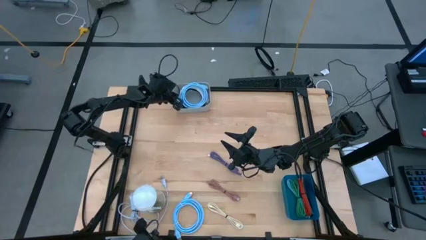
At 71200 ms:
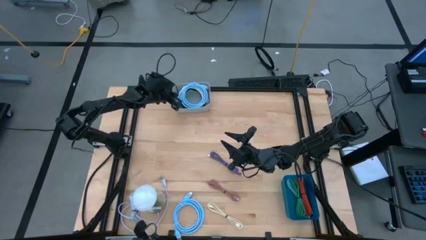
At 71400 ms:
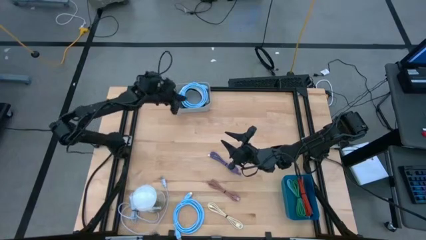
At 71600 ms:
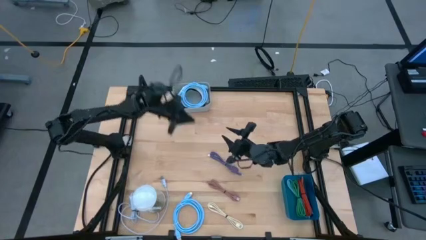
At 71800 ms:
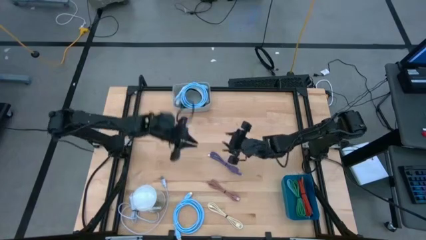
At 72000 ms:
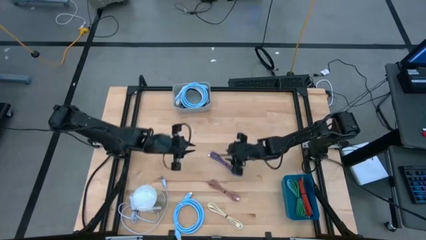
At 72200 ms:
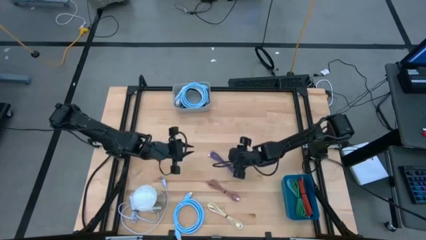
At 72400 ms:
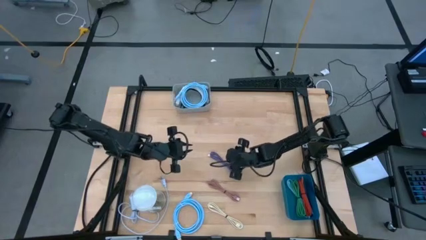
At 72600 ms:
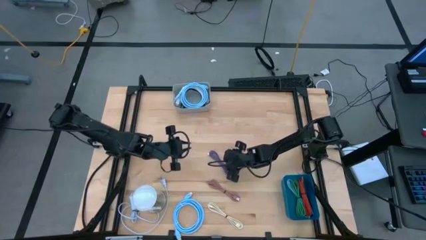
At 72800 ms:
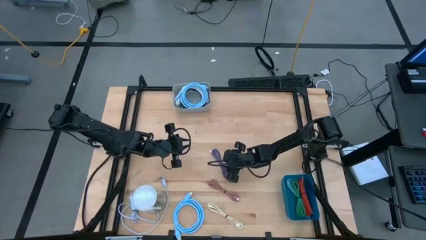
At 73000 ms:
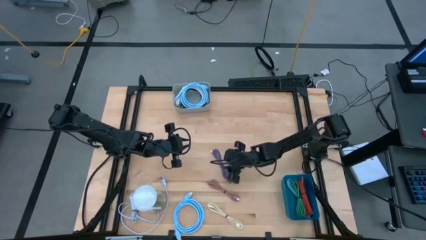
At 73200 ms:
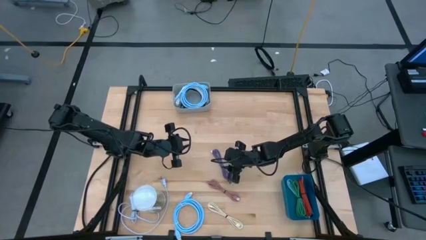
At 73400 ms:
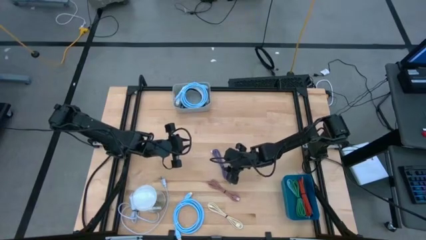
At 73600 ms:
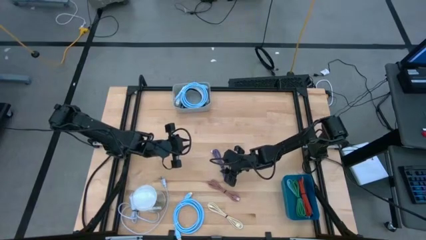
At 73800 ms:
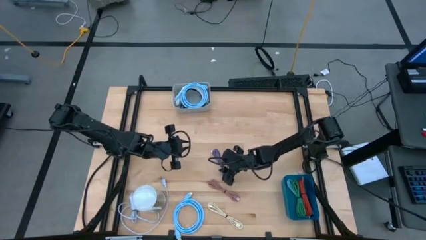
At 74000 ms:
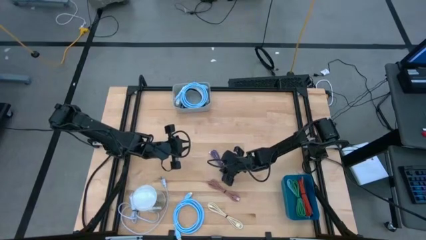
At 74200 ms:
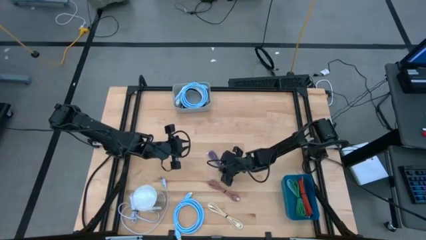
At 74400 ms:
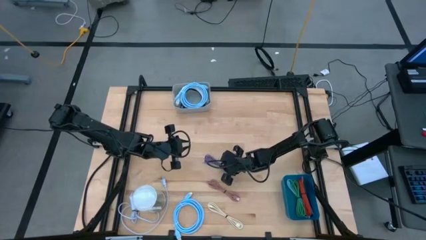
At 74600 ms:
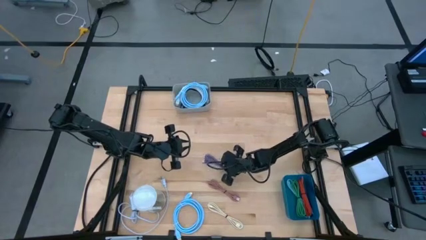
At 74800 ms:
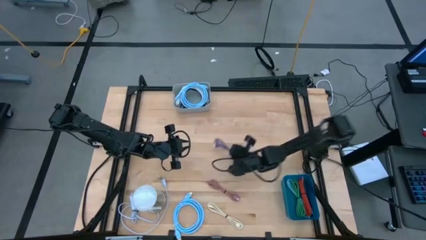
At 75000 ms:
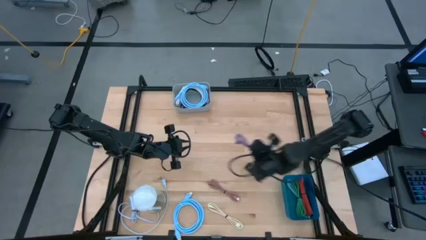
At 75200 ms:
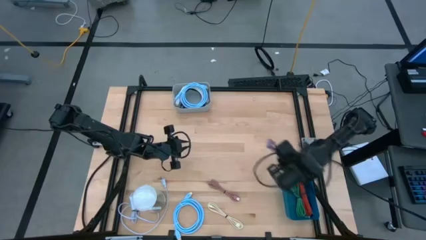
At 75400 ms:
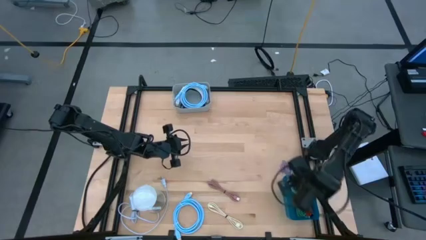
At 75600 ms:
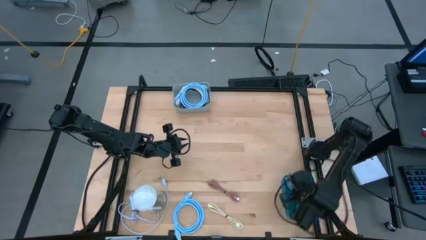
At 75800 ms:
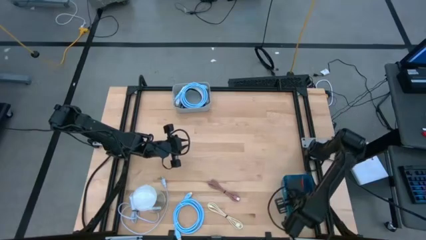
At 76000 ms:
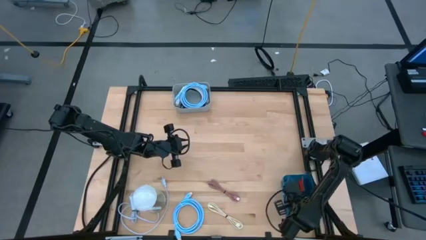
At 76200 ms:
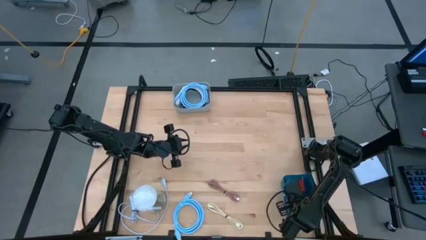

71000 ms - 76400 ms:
Task: Pick & Place USB Port
Put the violet USB cable into the blue bin

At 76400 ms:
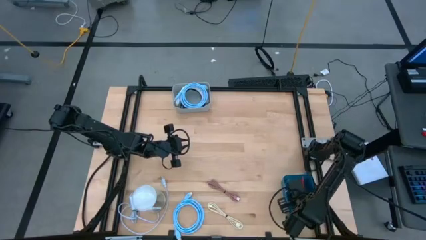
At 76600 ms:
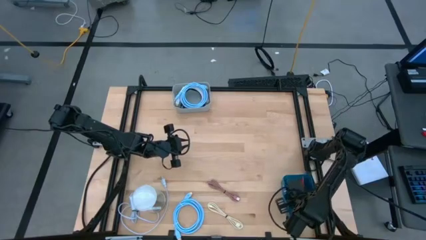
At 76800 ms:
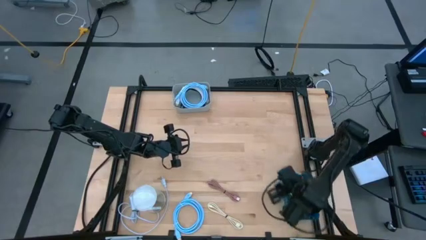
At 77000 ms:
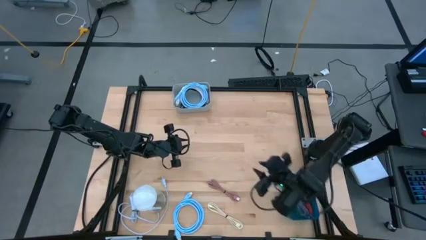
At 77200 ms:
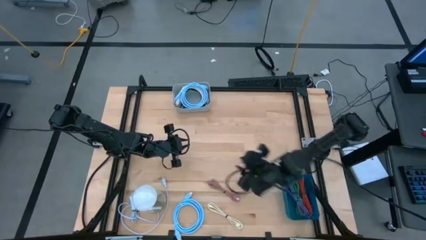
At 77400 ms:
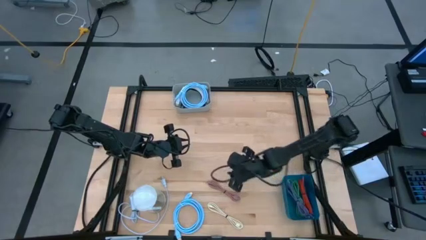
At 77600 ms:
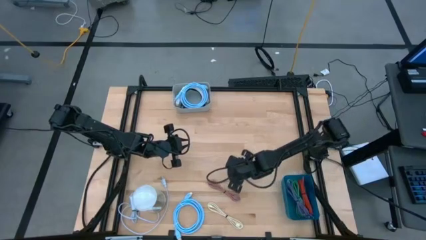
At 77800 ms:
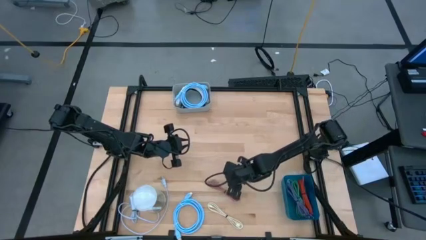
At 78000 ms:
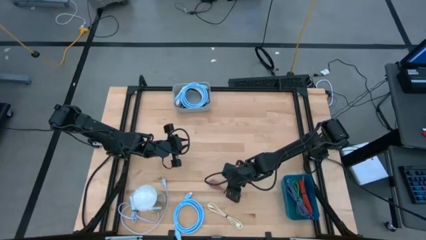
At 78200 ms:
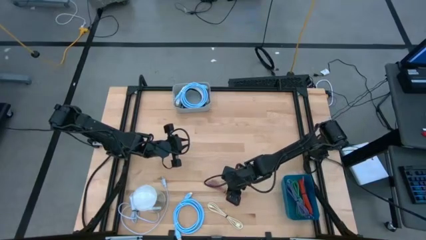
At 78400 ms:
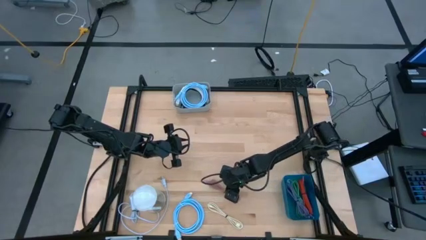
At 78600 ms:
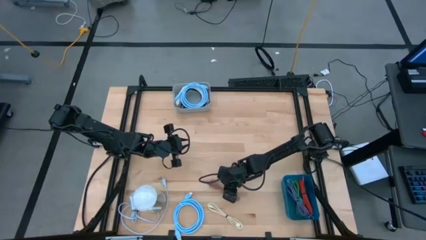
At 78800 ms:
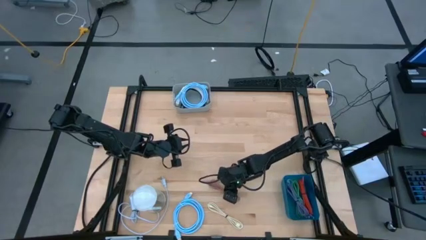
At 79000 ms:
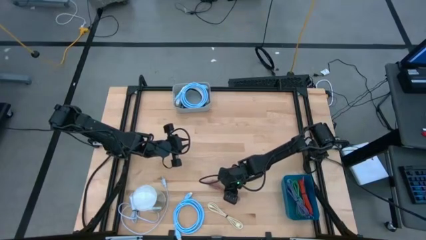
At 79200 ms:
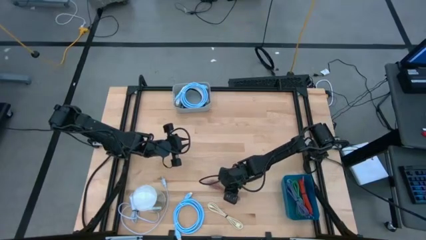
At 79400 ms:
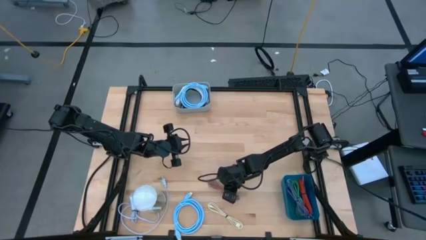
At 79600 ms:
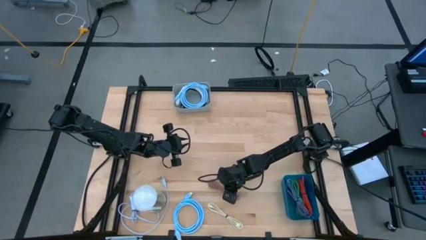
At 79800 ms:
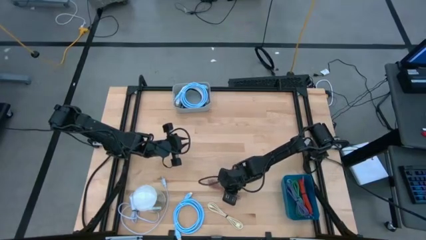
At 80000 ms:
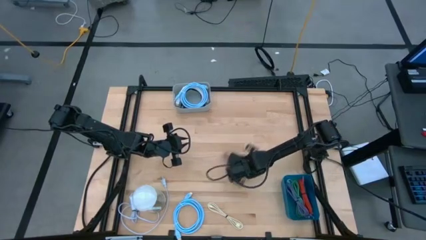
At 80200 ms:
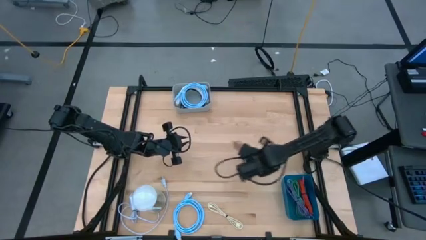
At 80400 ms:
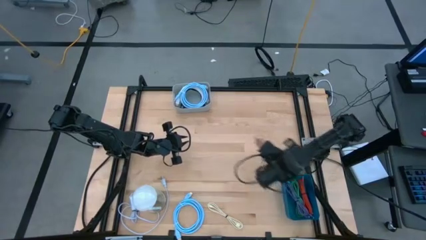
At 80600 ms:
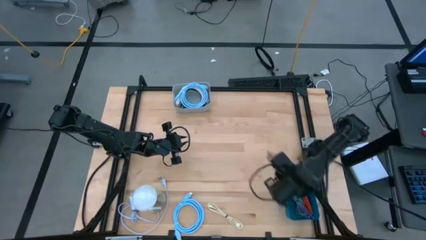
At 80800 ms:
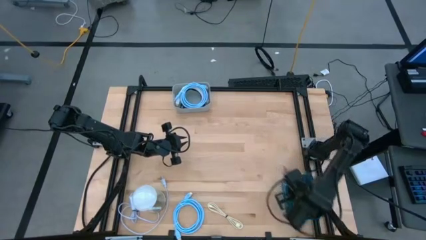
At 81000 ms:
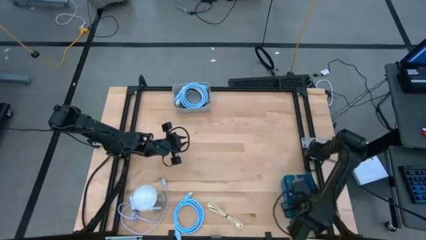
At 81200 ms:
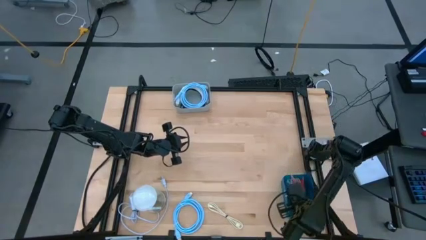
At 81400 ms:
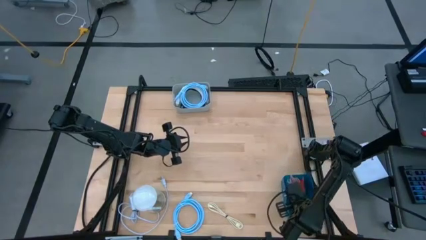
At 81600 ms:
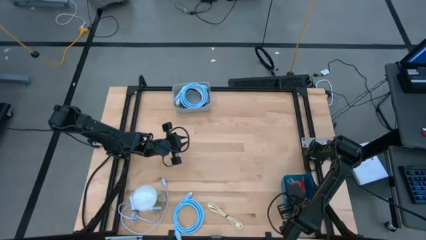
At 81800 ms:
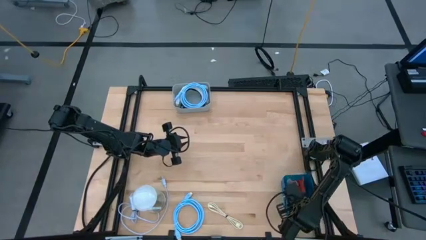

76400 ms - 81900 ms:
Put the brown USB cable into the blue bin

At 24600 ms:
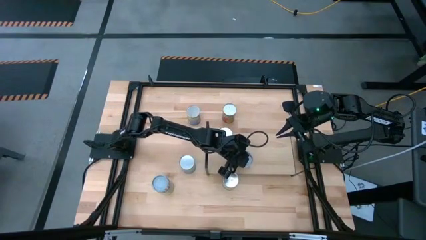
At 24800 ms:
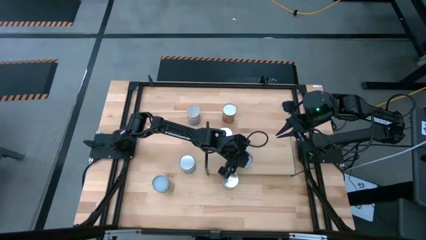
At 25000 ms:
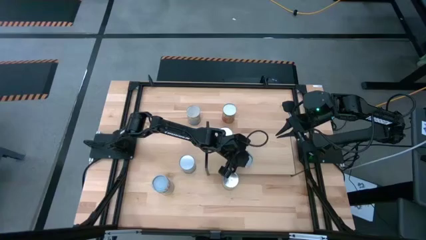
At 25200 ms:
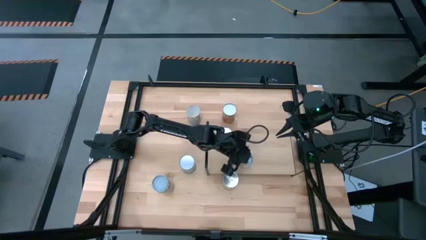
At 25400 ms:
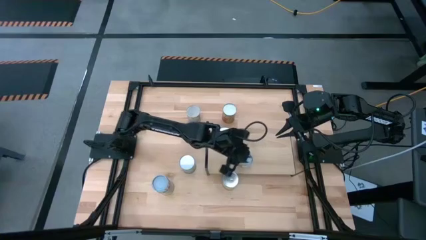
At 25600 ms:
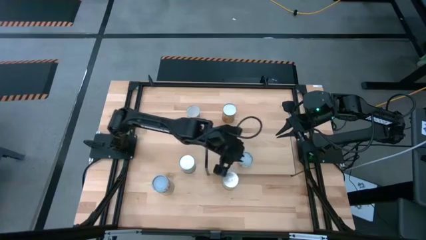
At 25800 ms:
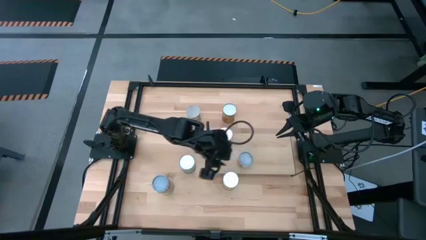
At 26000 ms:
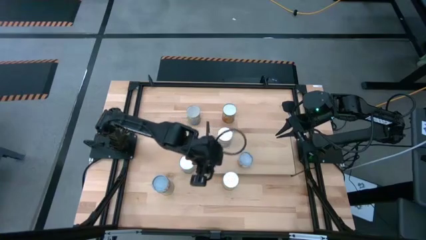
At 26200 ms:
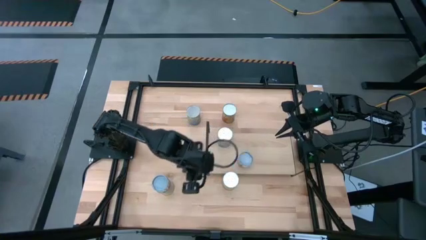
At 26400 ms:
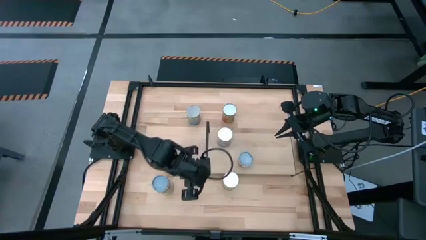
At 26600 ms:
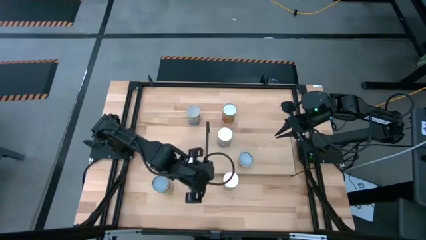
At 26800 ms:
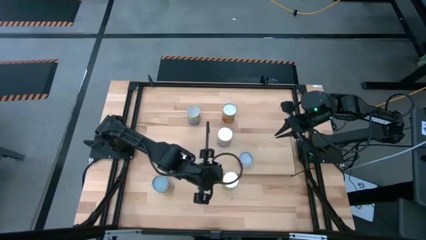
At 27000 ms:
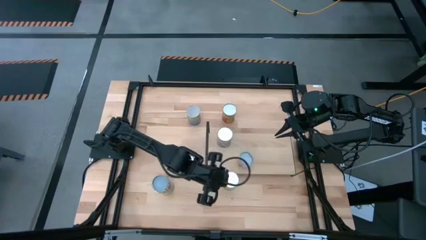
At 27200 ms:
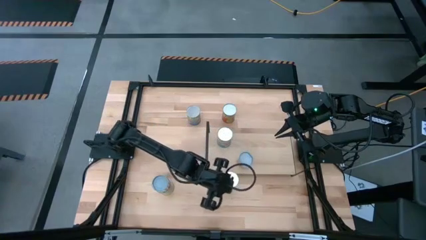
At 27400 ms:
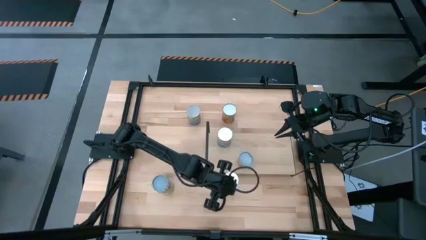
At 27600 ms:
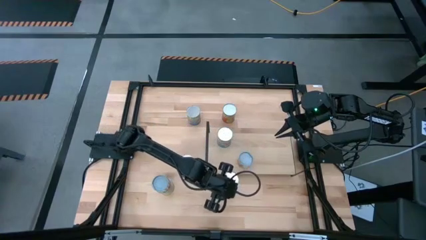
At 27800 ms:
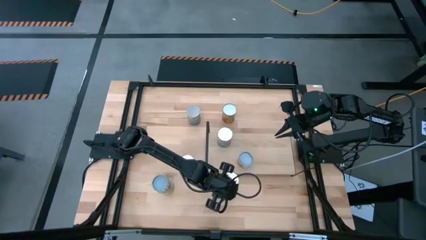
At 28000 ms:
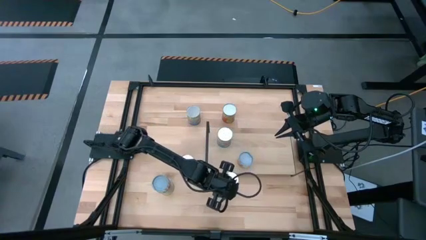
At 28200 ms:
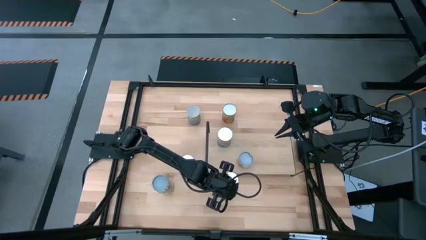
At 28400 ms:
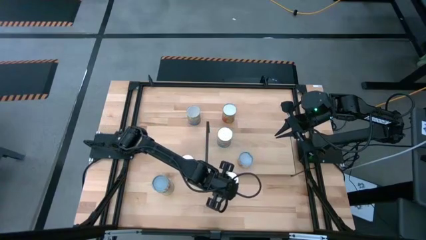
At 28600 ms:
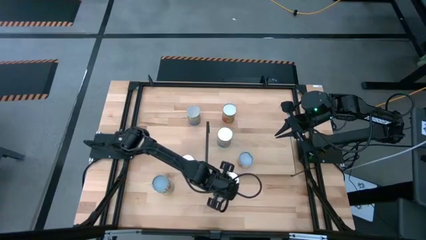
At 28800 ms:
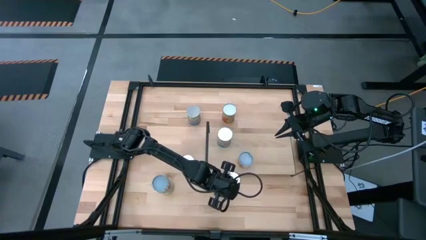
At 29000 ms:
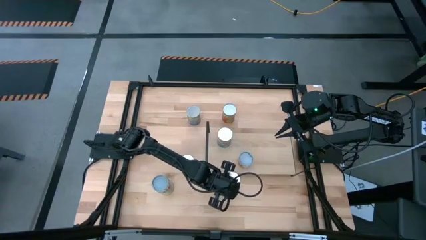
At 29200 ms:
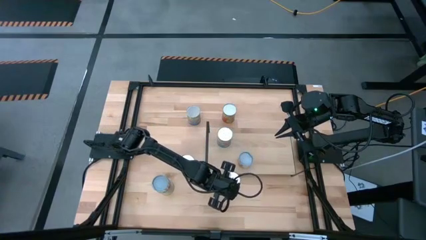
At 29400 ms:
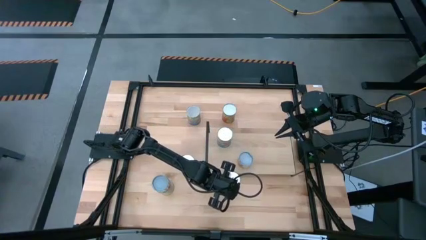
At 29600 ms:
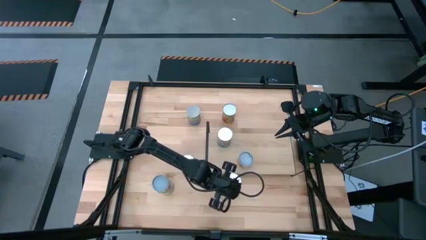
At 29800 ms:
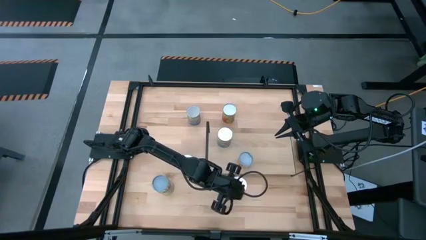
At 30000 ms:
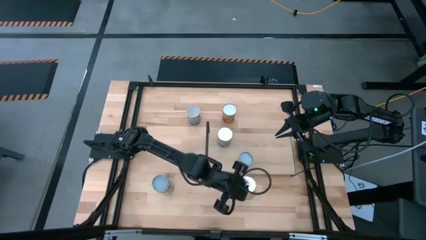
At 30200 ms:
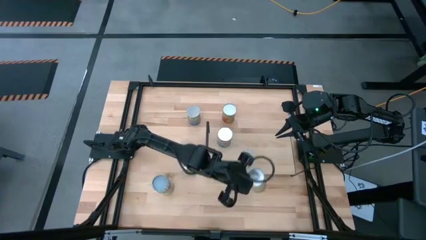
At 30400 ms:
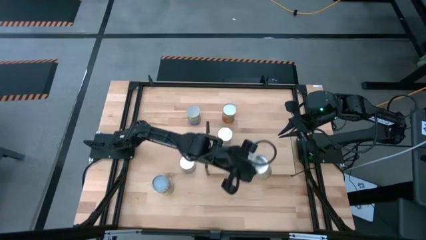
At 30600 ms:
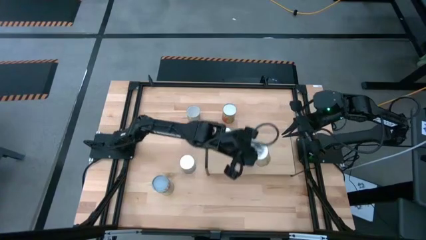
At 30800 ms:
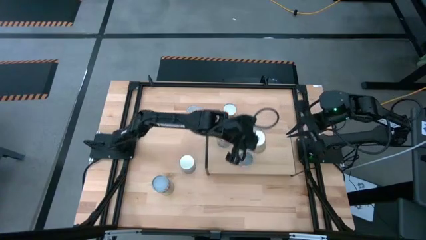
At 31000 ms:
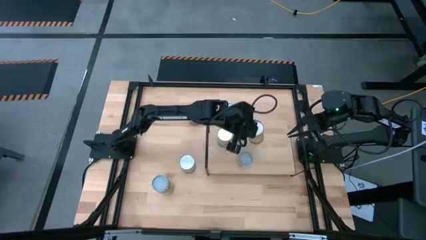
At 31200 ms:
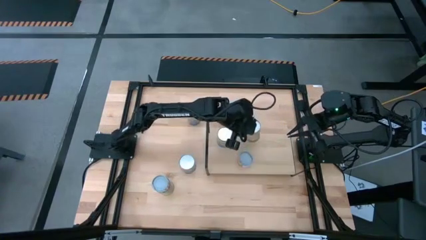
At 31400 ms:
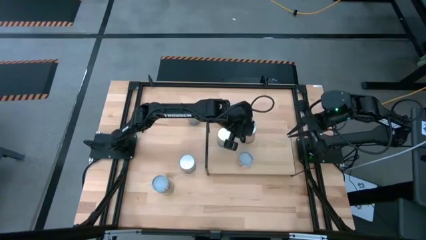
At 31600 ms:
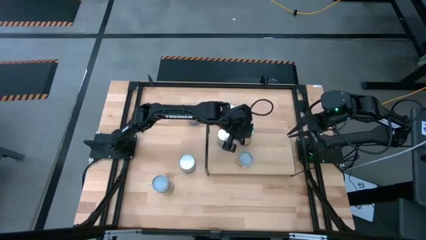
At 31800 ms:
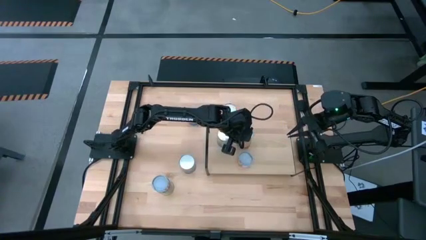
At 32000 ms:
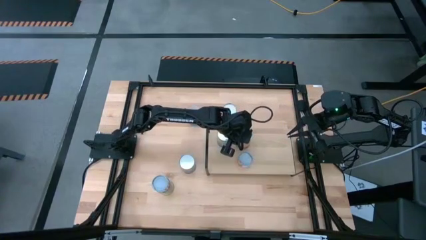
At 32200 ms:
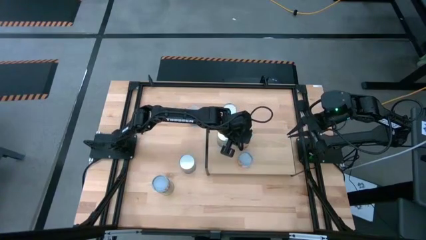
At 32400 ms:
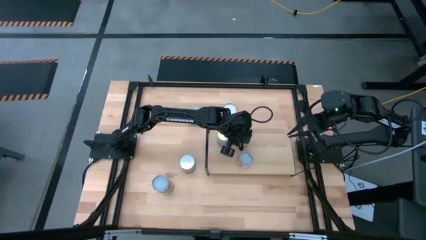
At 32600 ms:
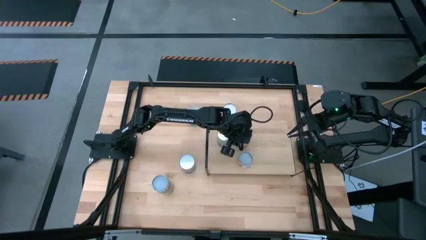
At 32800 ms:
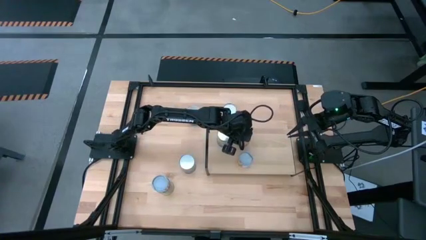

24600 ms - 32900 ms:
Task: Pick and place cans onto a shelf
Put the large canned oranges on the shelf
